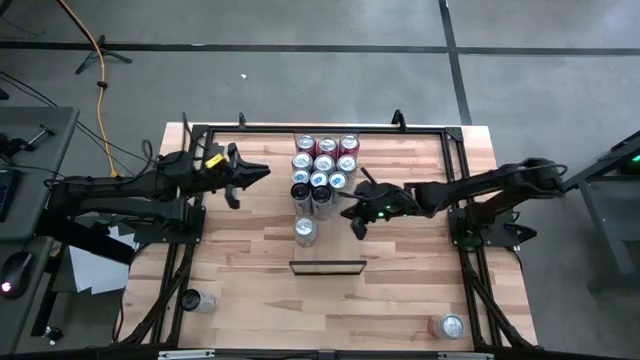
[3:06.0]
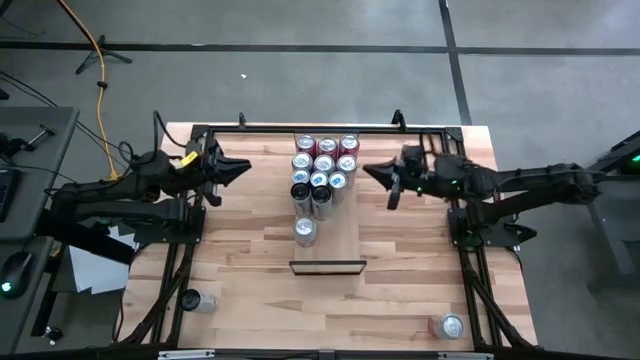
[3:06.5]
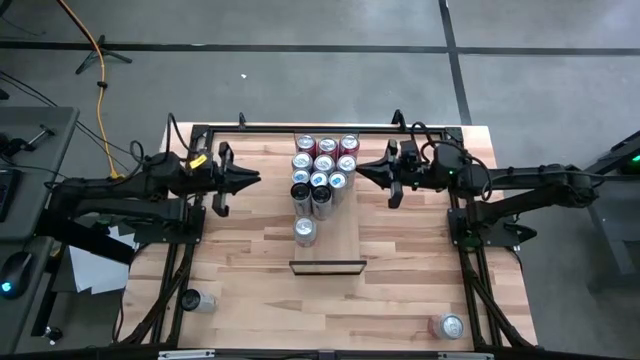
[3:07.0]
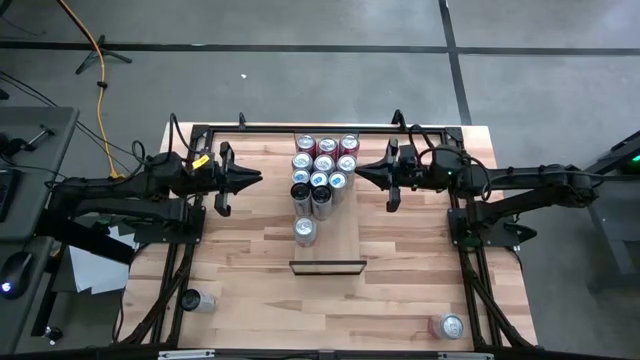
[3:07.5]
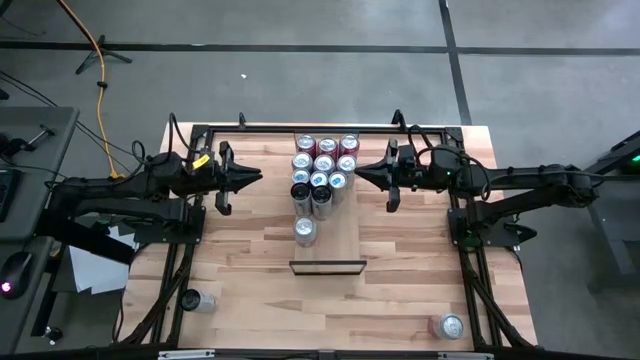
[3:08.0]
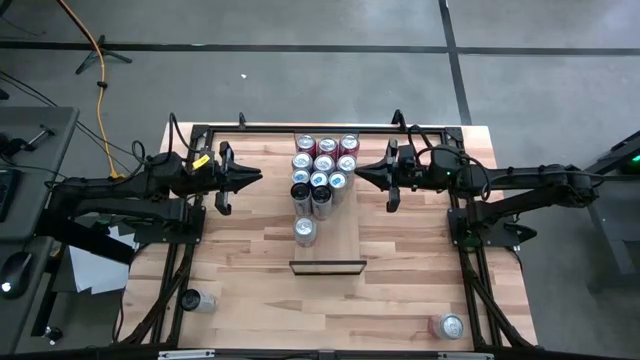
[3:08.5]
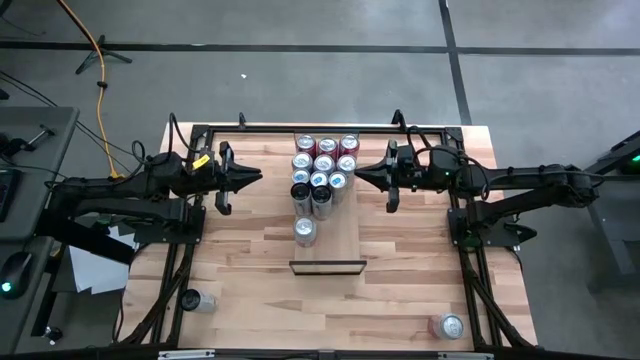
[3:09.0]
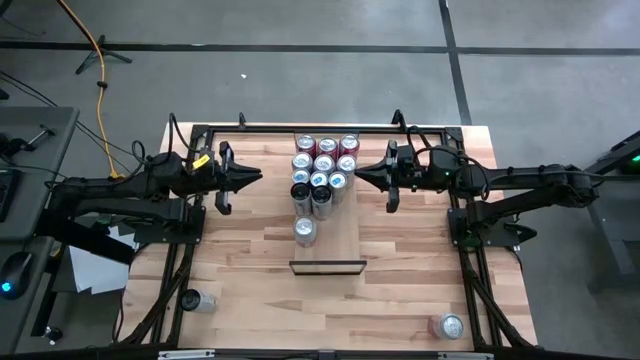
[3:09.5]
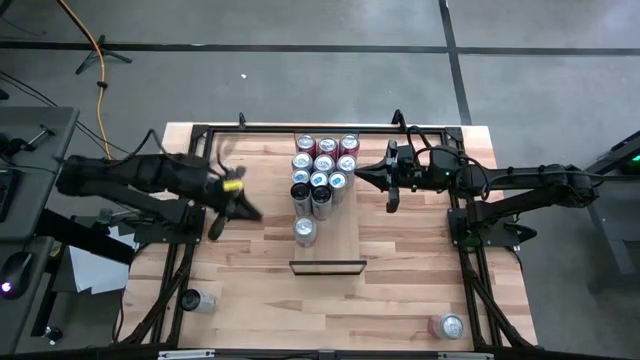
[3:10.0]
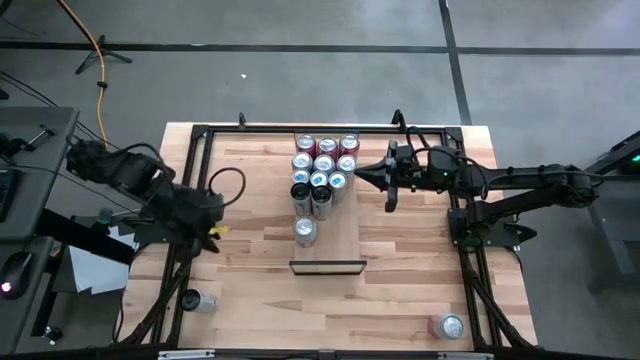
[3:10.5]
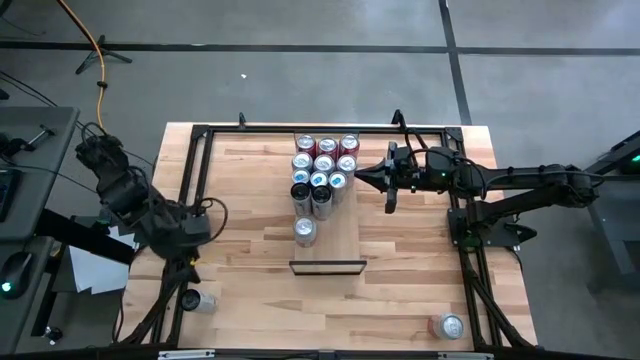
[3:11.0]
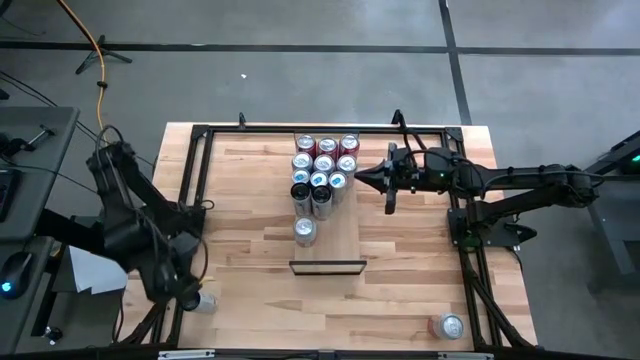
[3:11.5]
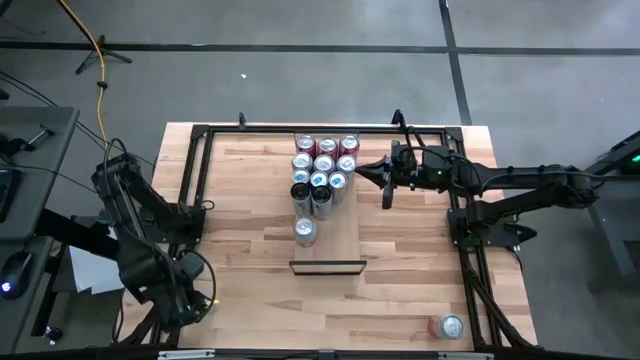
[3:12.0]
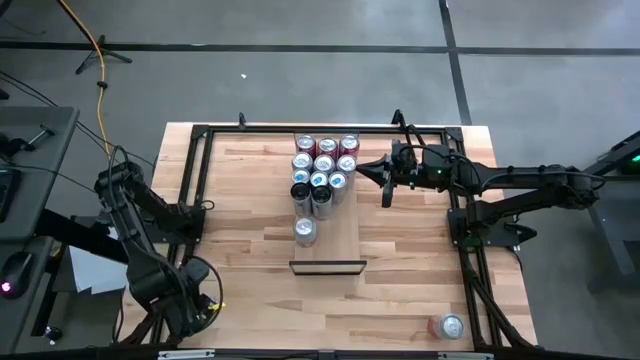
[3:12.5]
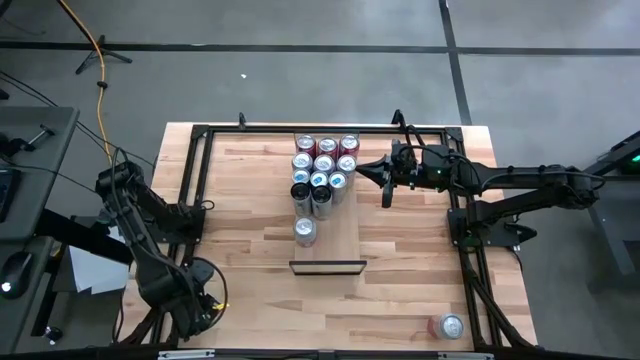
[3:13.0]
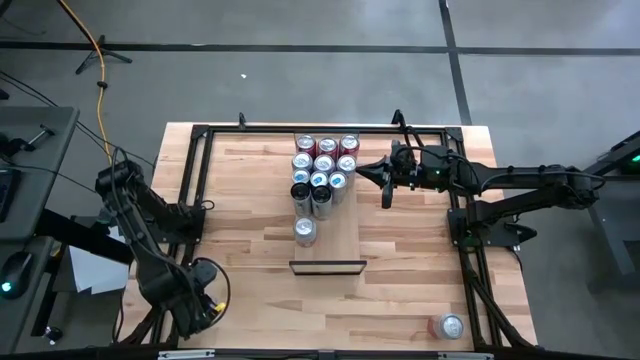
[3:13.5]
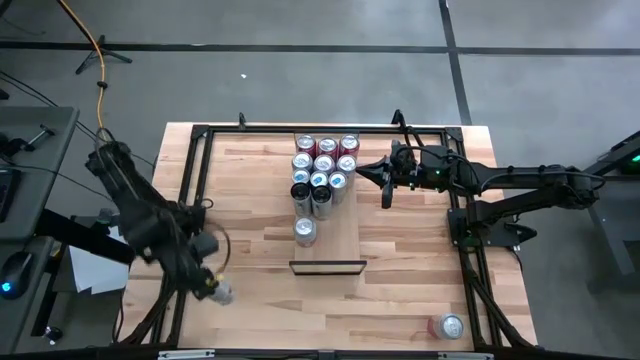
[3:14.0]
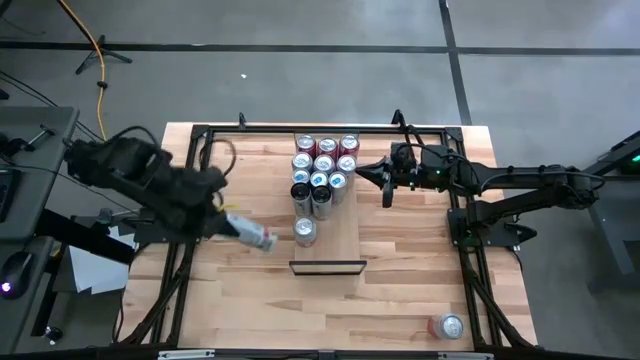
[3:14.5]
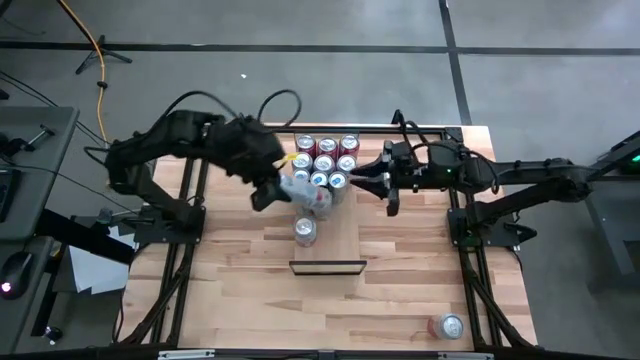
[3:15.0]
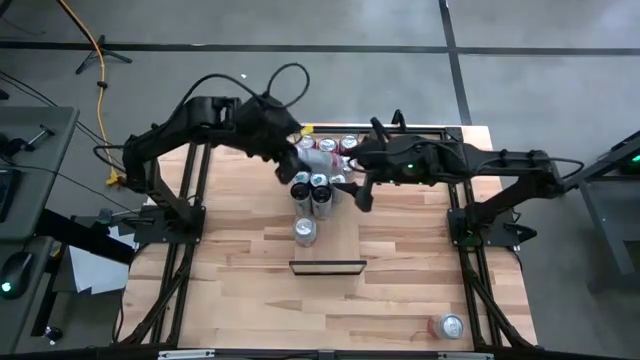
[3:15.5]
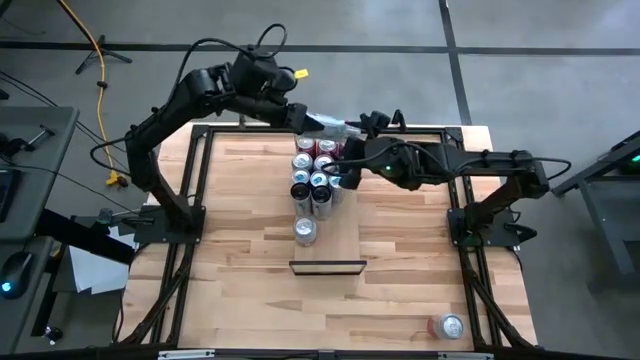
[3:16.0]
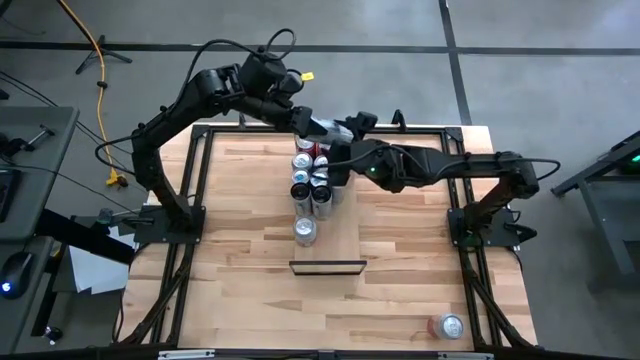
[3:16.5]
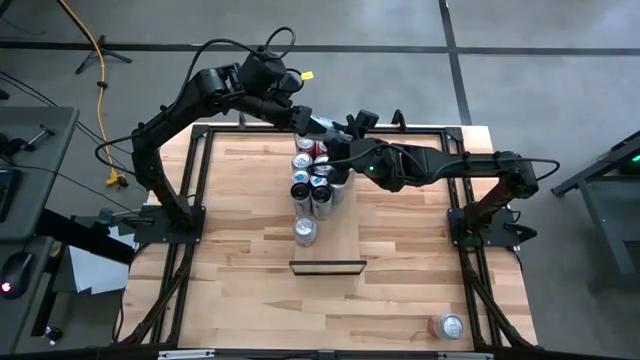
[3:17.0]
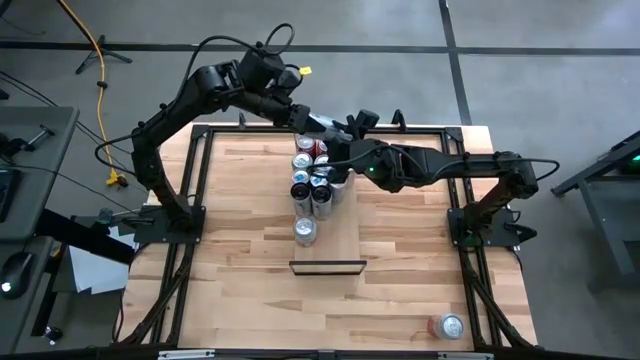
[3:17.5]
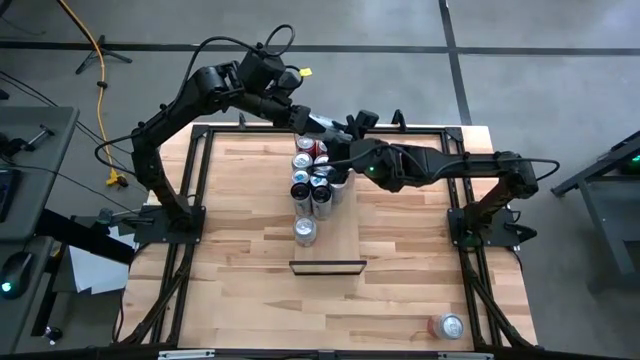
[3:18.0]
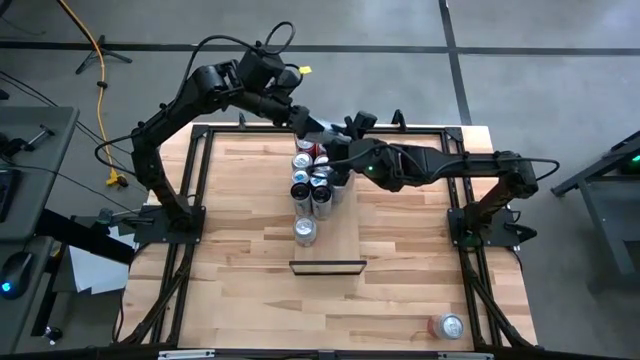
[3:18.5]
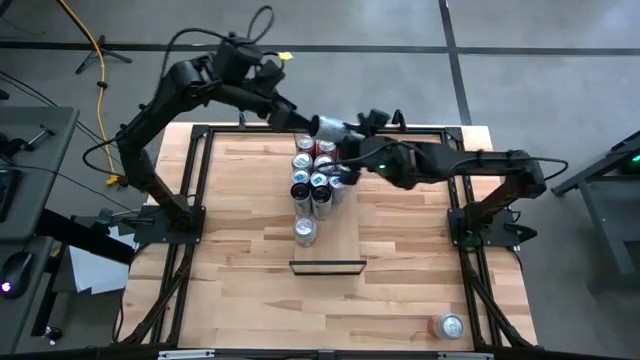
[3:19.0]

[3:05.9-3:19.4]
Task: Place canned beverage on shelf
Put the white pink soda can on the shelf aligned with the other white pink soda cans

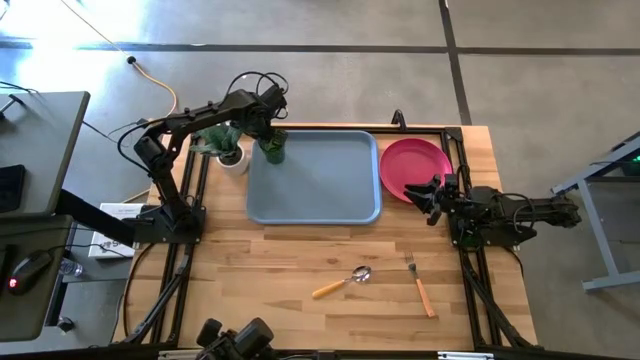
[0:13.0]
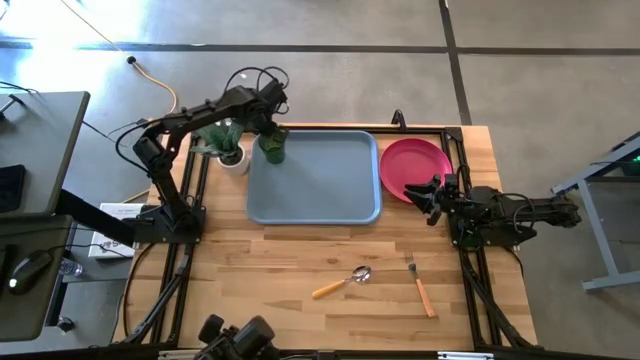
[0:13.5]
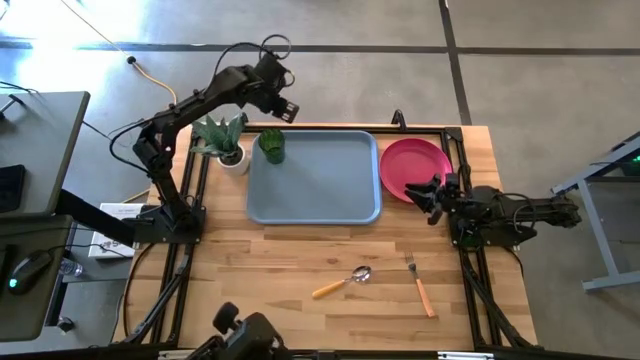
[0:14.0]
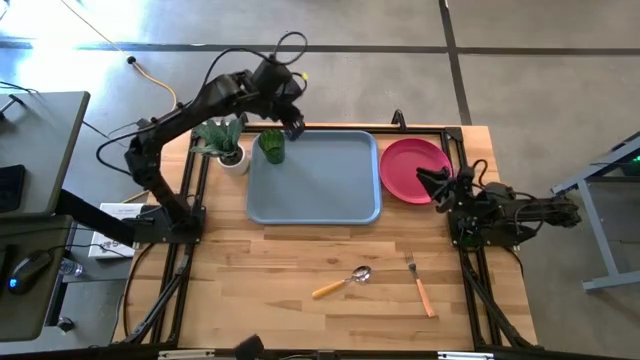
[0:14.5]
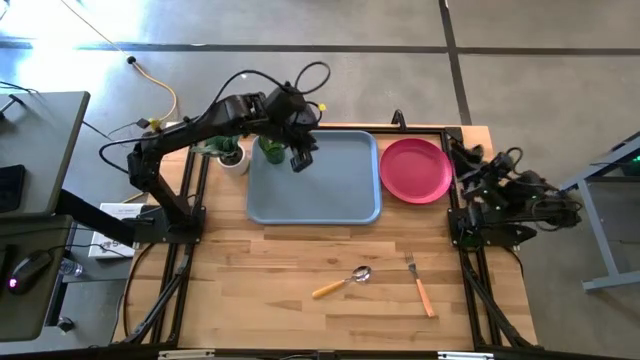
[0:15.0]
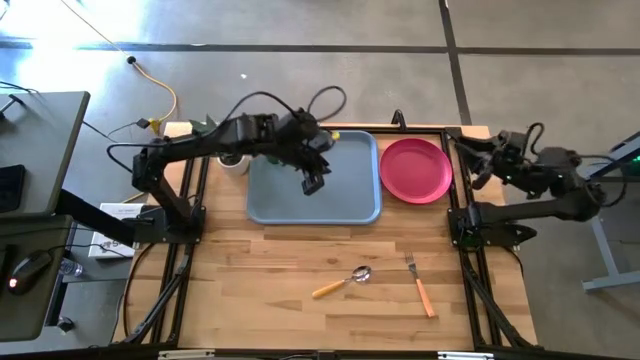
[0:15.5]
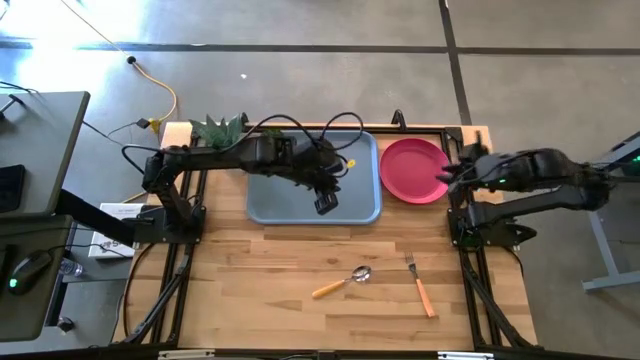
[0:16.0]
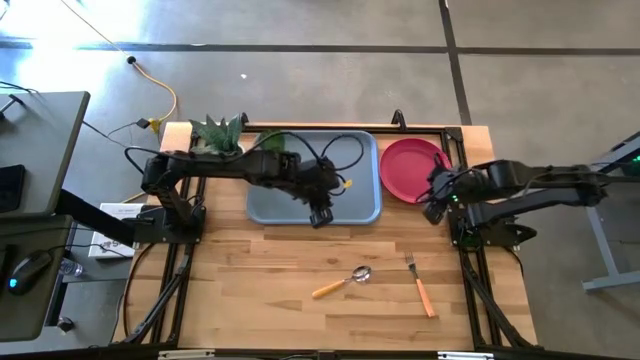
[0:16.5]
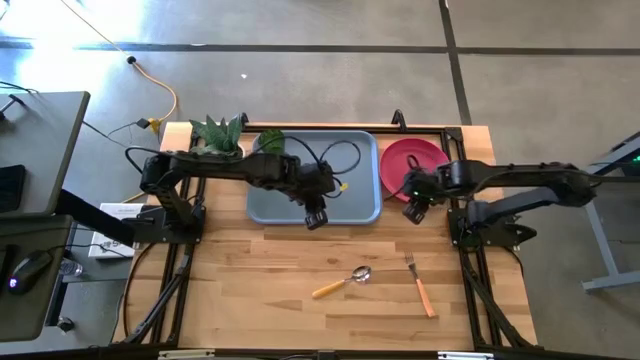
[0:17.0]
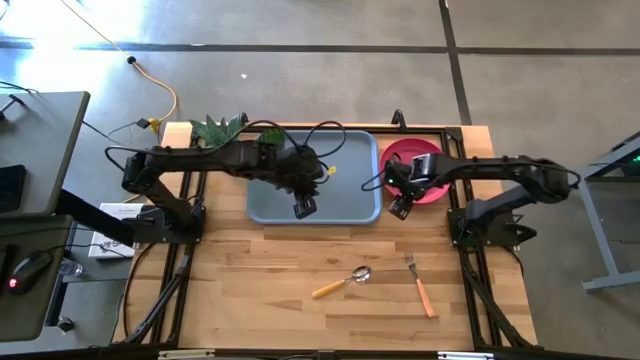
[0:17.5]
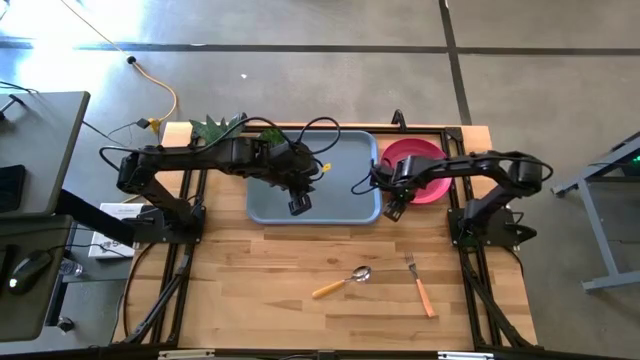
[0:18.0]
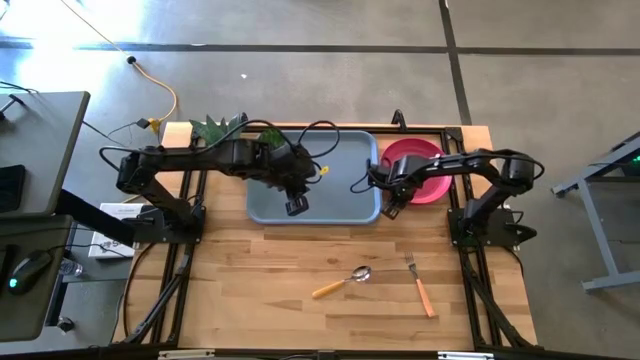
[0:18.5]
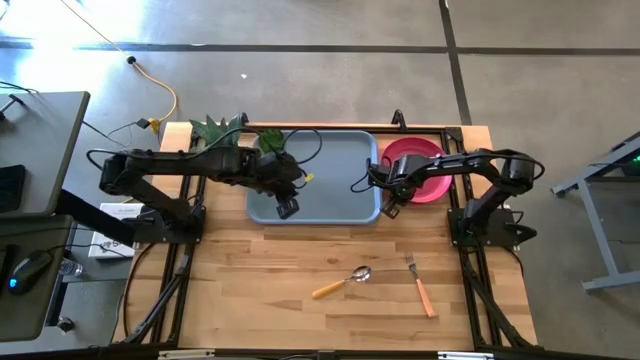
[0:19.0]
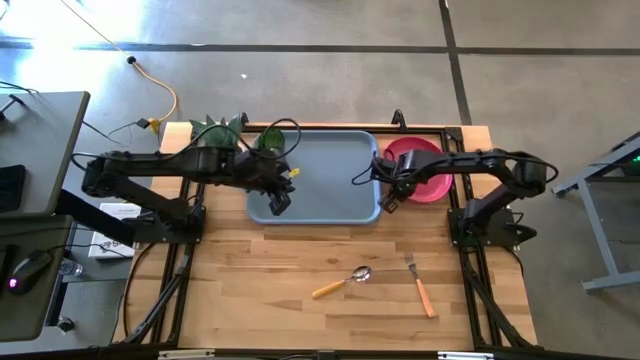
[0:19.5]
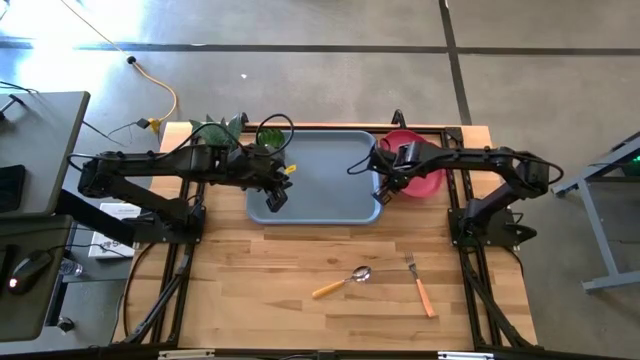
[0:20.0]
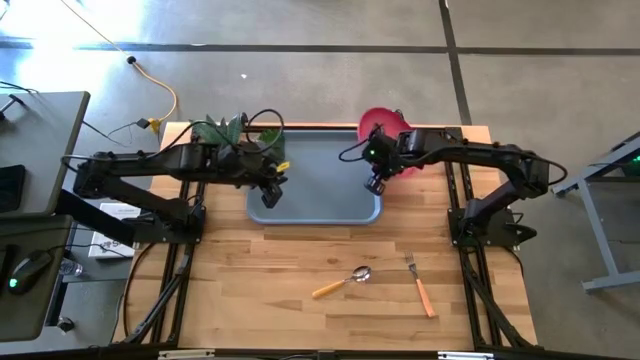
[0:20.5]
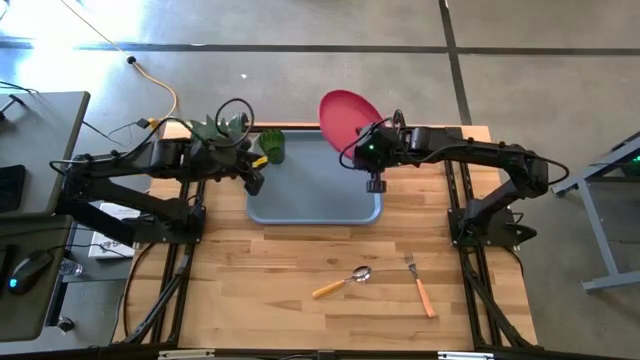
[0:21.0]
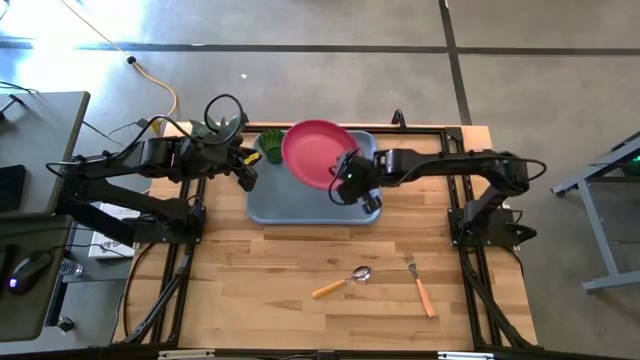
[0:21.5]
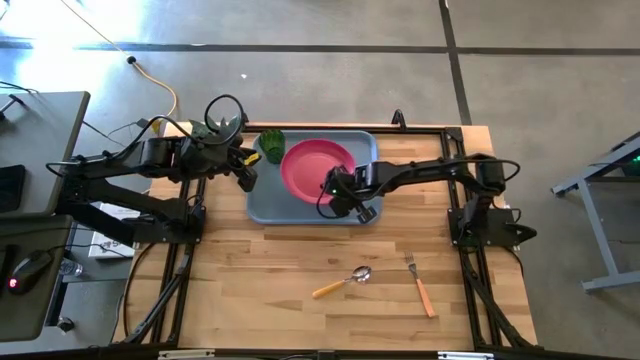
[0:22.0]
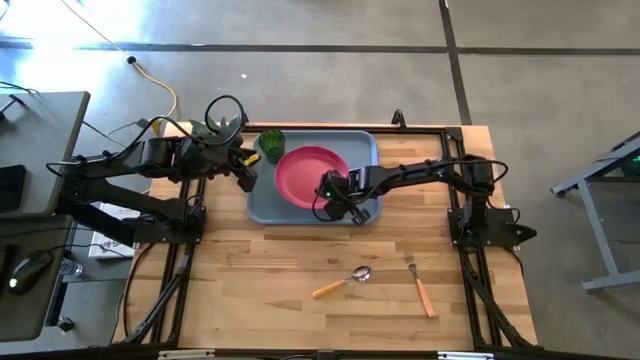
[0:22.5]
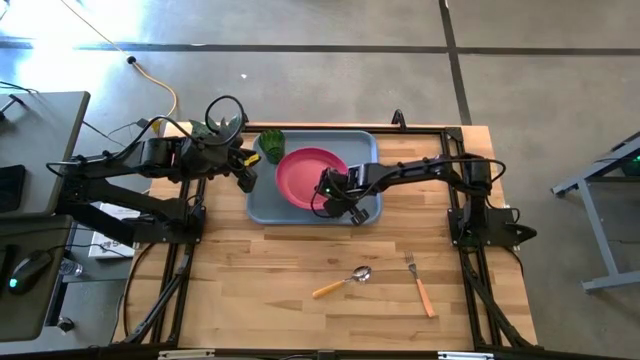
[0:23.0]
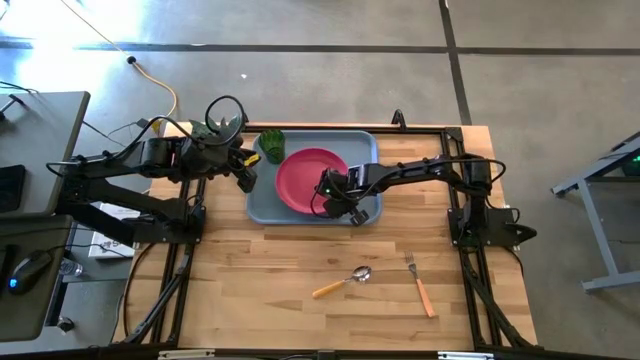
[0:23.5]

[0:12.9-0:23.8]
Task: Pick and place plate/cup/fork/spoon on tray
Put the pink plate on the blue tray
